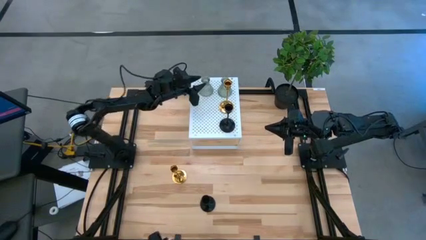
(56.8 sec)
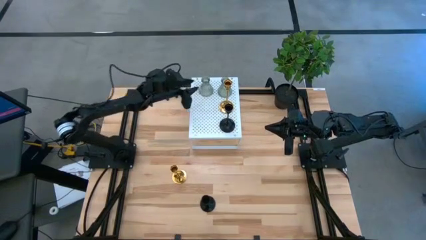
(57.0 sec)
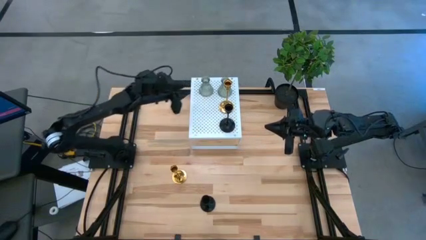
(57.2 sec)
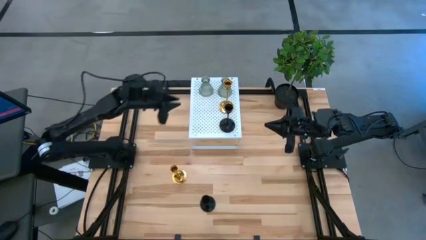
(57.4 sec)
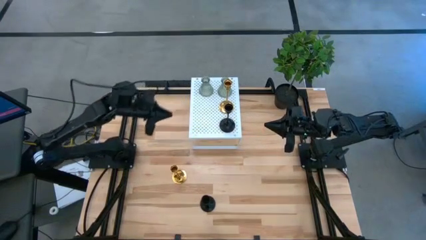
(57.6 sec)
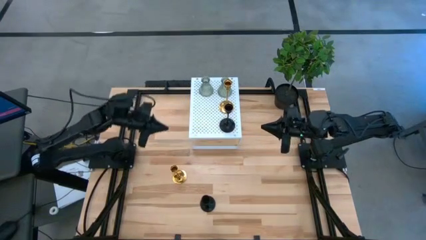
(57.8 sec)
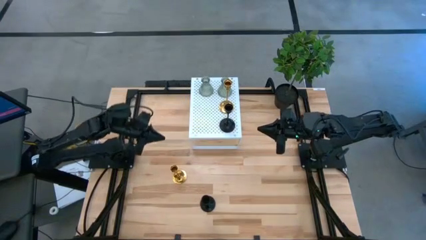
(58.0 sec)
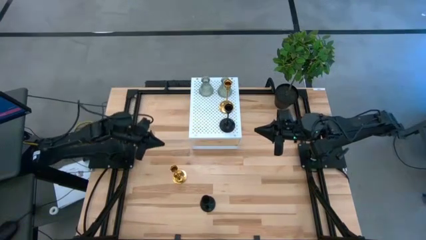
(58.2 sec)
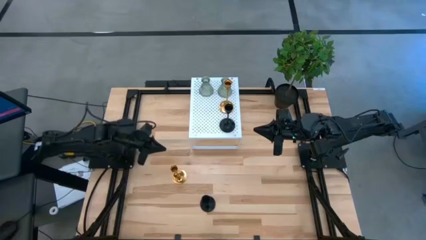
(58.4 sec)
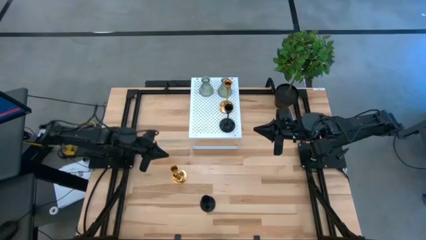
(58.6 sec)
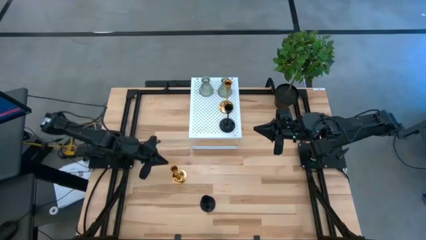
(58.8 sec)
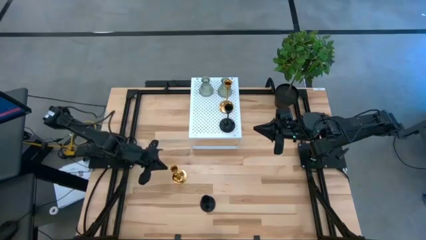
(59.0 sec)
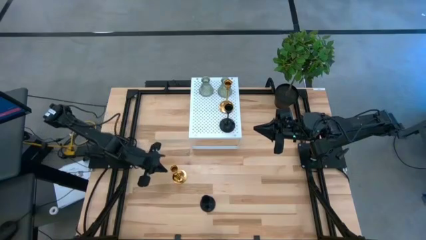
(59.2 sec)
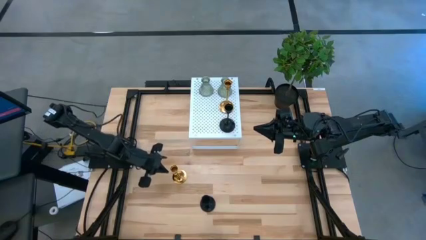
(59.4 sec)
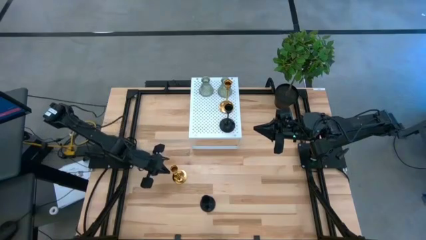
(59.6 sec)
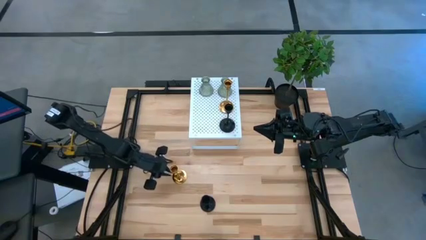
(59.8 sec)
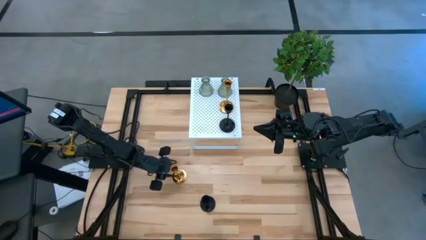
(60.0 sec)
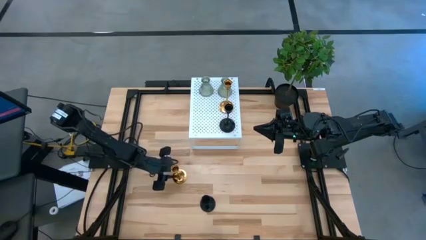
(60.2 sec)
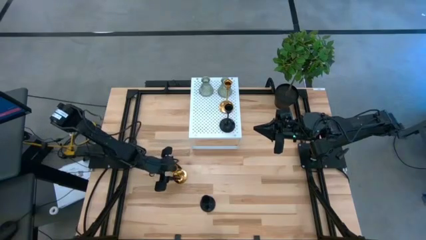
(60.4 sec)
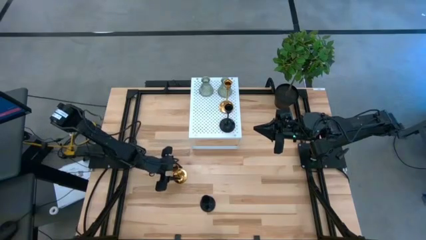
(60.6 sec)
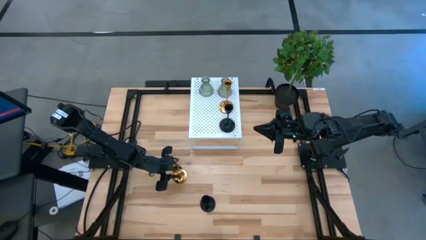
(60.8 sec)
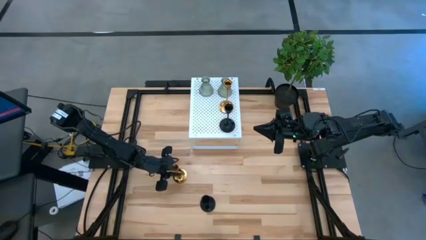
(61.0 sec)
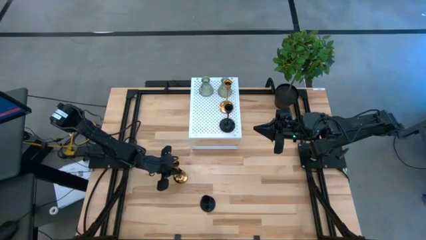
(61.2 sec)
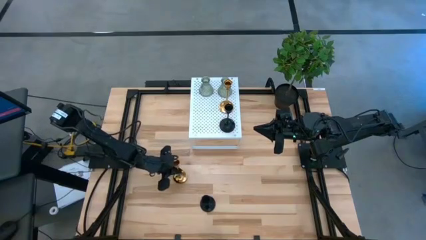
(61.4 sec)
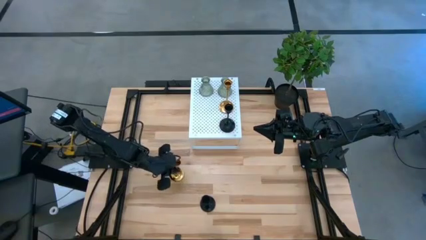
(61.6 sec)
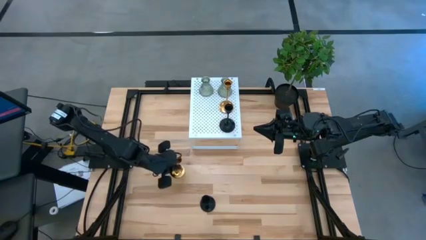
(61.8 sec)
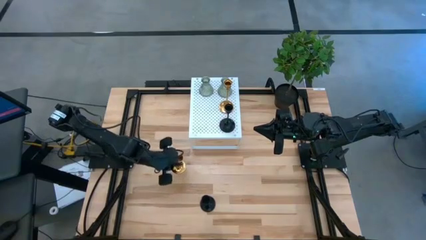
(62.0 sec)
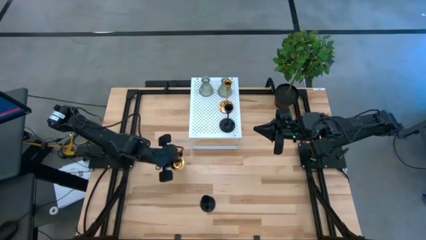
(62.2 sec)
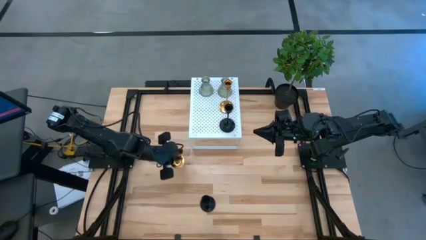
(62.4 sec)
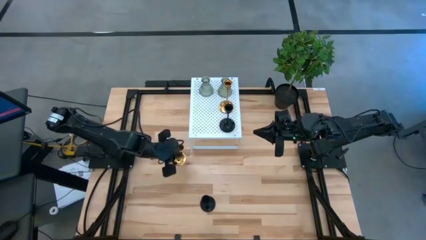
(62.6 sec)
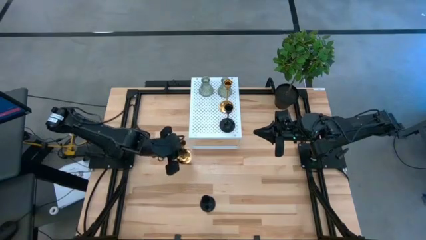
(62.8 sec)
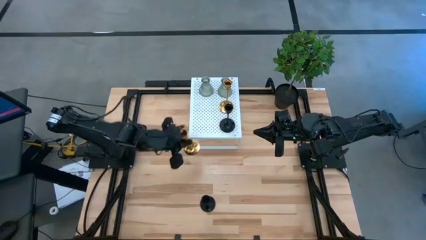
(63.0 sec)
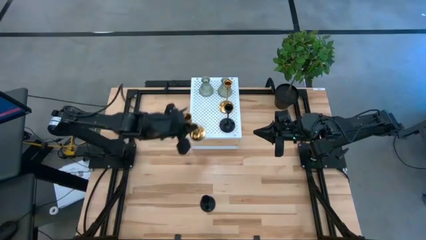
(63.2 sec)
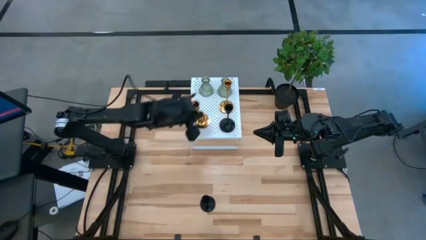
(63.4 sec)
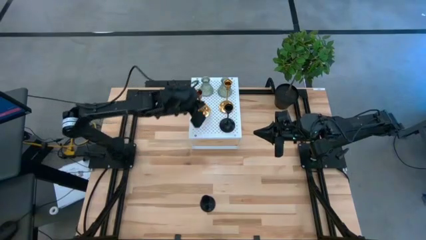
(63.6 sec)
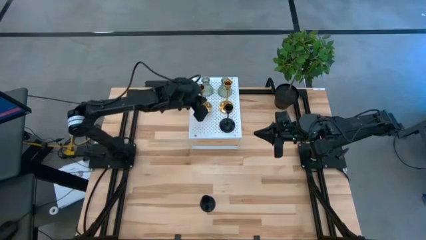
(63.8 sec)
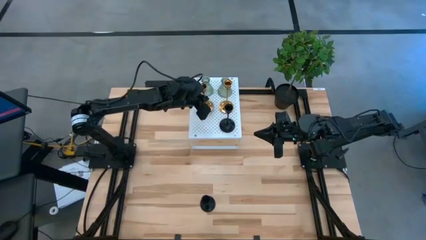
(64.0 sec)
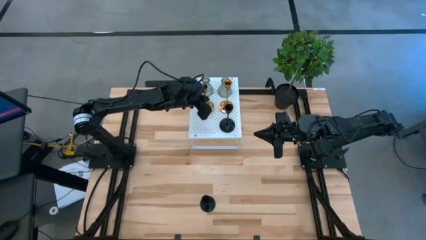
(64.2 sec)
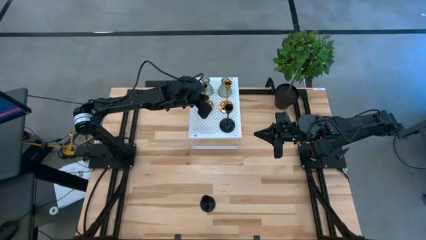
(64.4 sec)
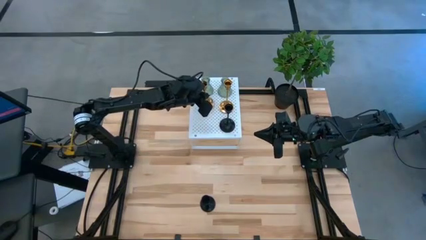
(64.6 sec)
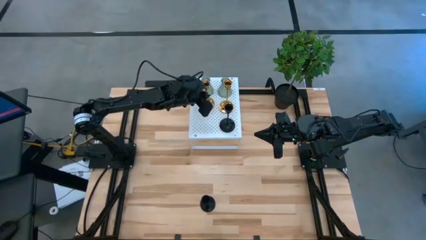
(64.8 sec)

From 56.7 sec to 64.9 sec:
Task: Pick & Place candle stick holders
Put the gold candle holder on the shelf

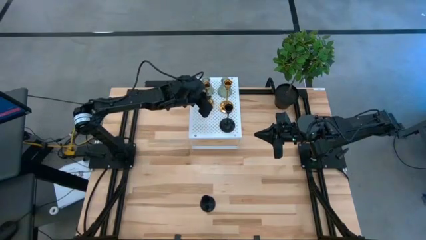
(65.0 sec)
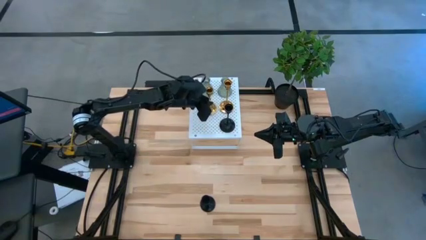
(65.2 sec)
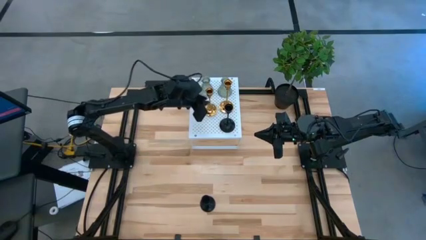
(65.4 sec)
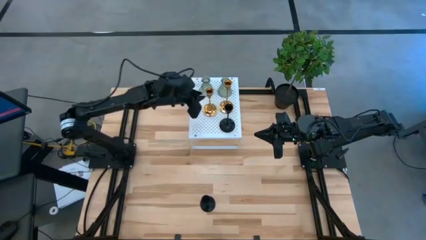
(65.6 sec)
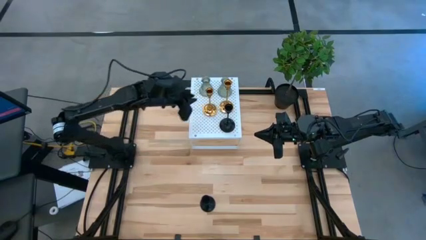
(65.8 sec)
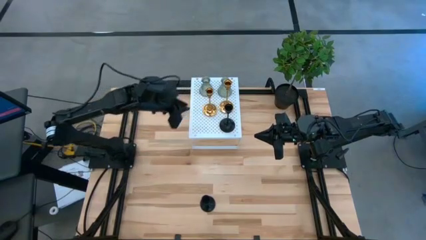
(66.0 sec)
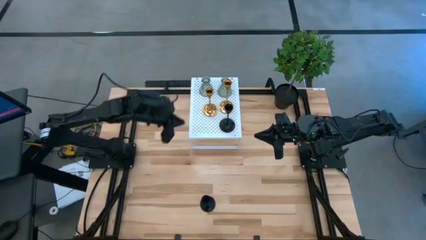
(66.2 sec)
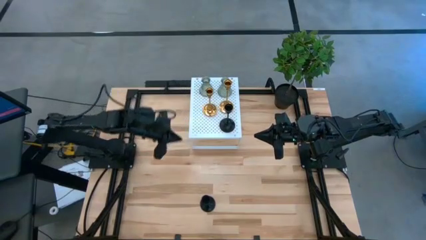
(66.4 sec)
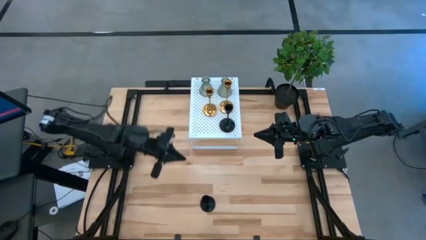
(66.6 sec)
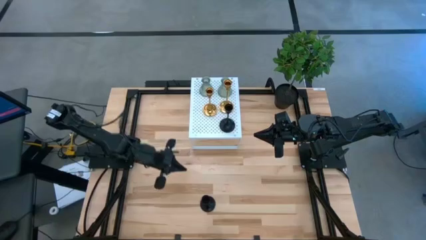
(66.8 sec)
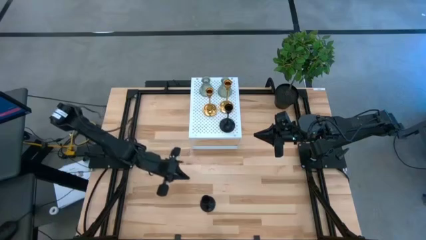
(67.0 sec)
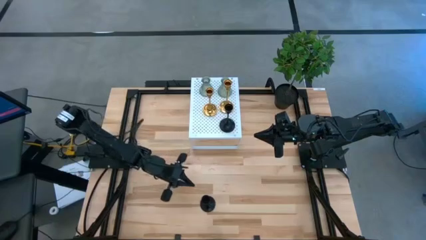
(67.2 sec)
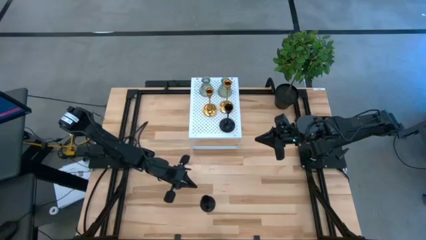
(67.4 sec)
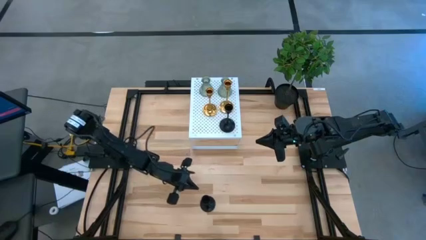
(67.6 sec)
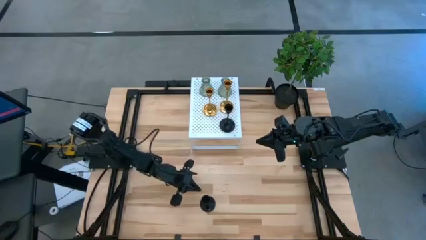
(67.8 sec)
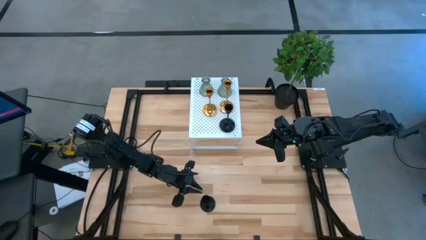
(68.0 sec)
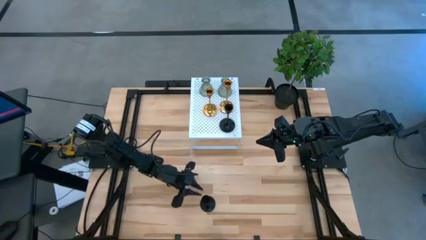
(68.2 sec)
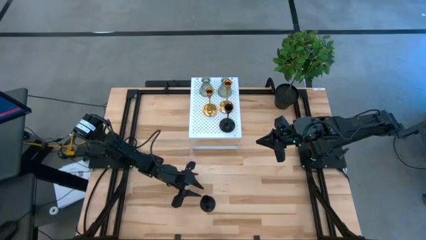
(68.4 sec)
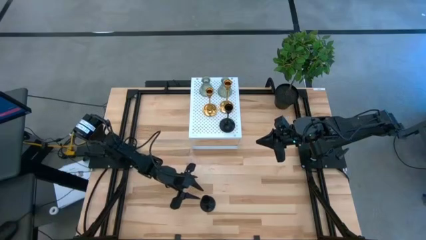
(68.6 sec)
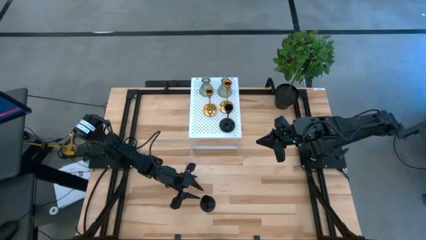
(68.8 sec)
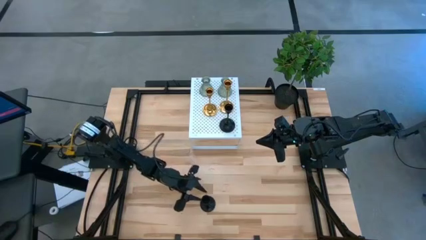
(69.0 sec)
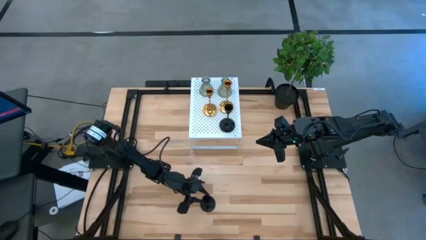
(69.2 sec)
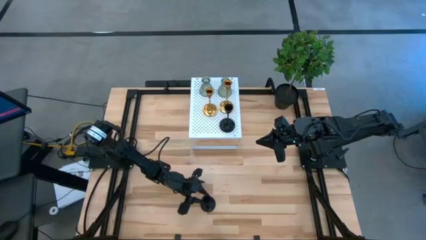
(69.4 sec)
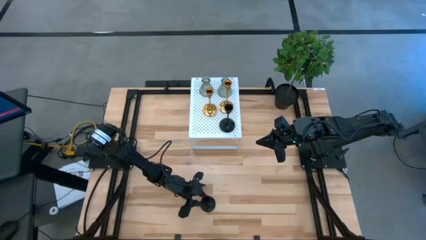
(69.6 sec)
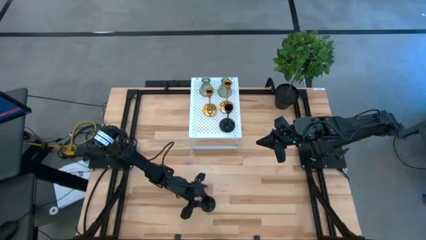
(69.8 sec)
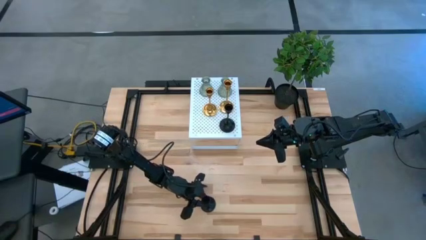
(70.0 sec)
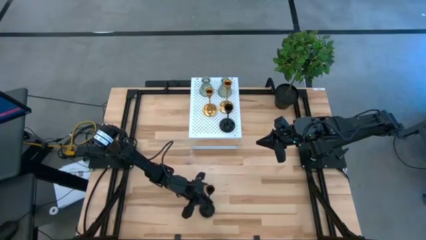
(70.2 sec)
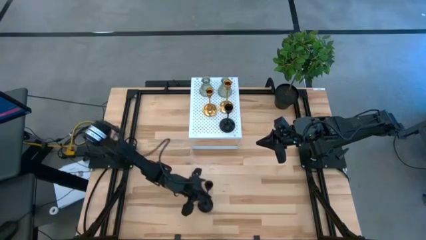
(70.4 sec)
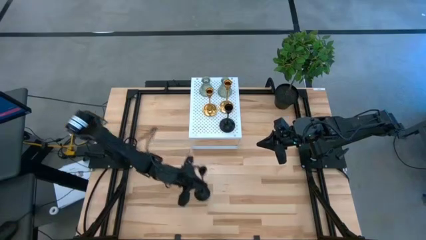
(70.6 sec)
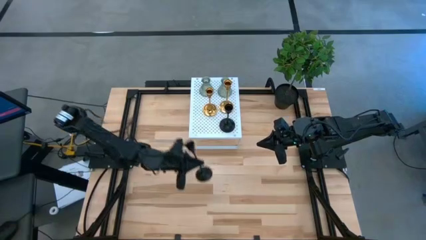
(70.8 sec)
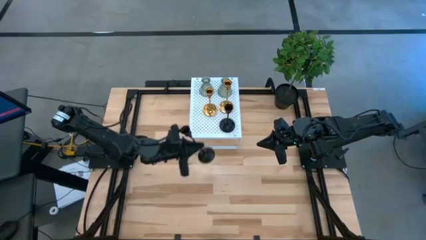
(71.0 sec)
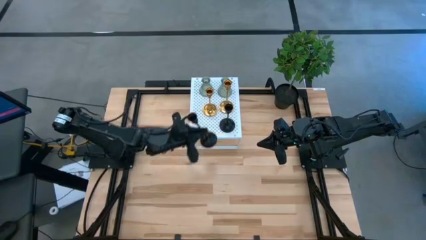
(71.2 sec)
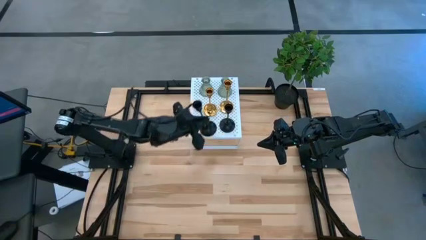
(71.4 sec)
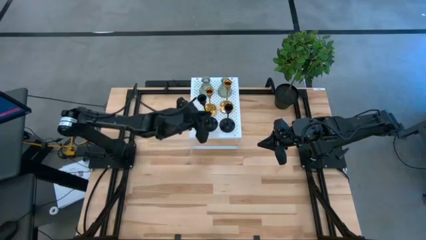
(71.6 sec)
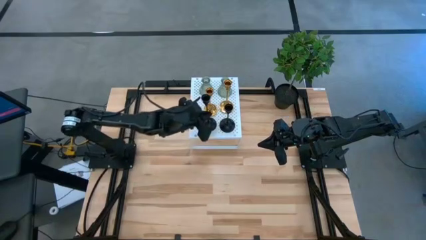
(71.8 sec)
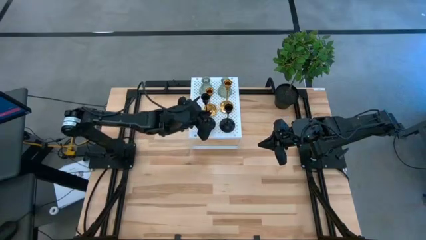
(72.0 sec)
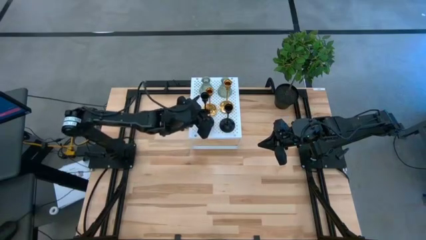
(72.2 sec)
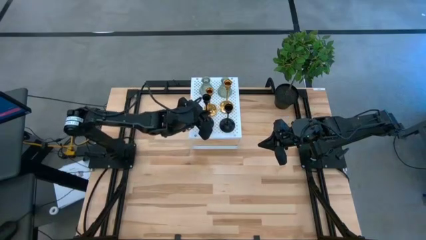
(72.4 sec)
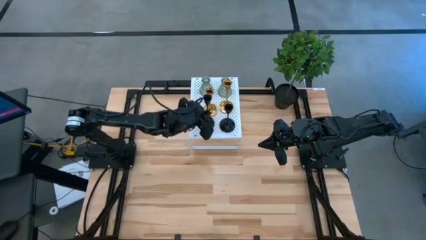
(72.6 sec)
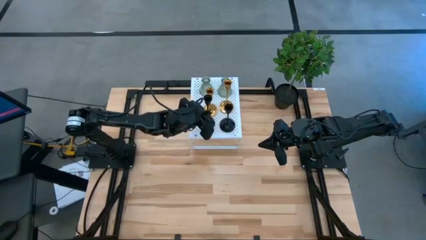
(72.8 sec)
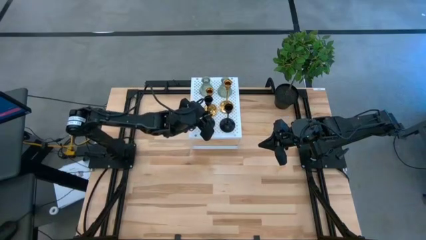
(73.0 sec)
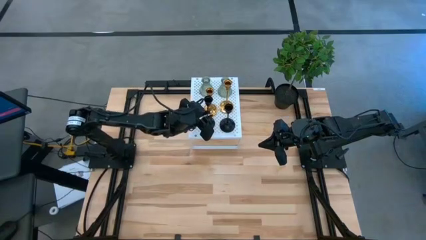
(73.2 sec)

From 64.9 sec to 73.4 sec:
Put the black candle holder on the shelf
